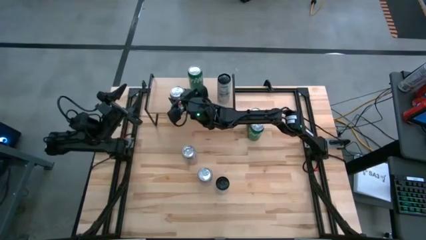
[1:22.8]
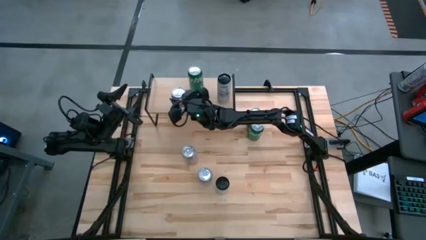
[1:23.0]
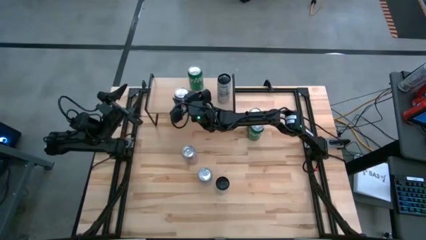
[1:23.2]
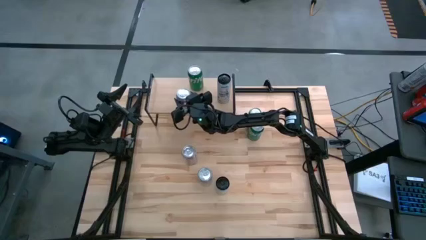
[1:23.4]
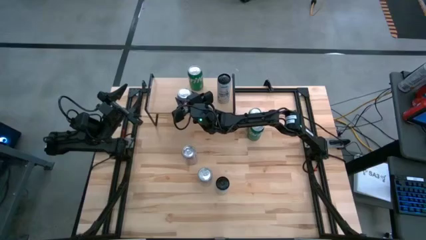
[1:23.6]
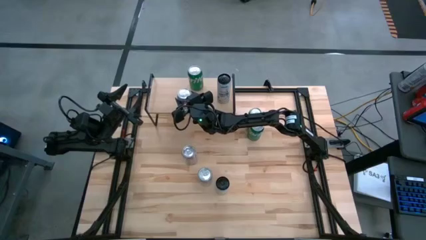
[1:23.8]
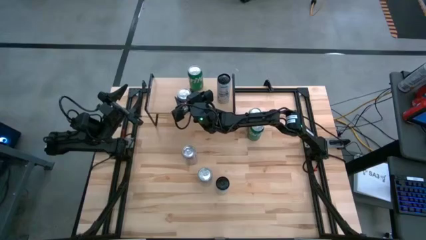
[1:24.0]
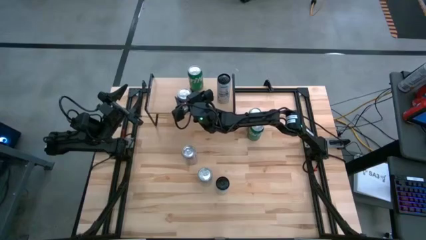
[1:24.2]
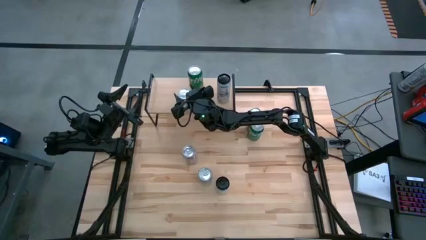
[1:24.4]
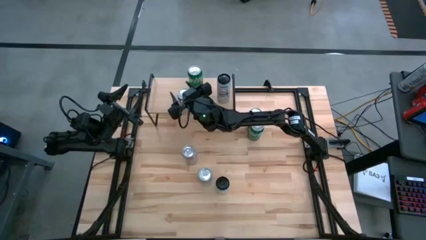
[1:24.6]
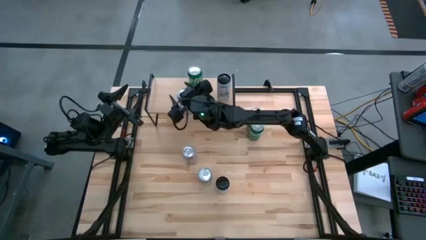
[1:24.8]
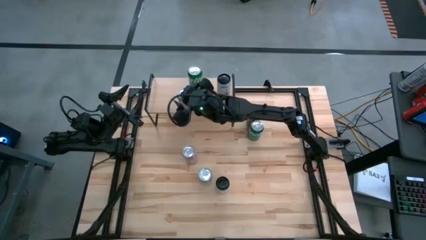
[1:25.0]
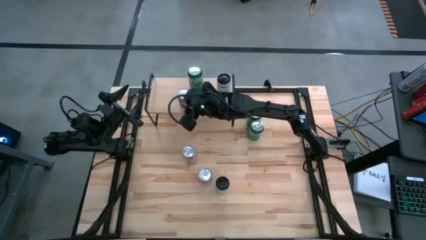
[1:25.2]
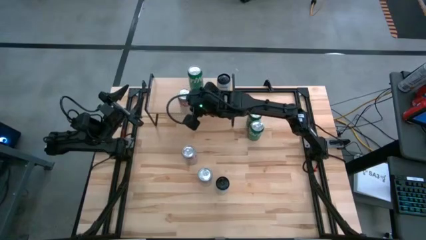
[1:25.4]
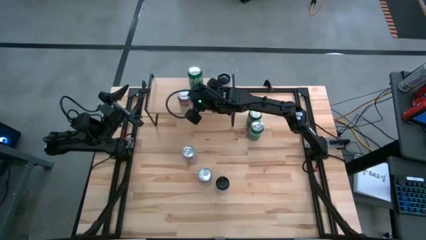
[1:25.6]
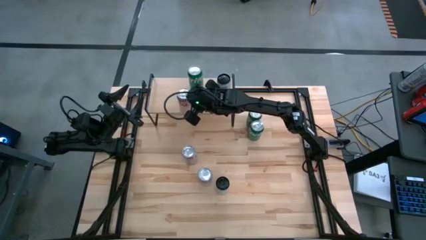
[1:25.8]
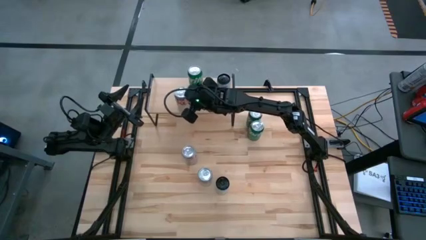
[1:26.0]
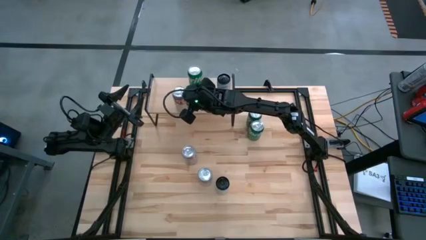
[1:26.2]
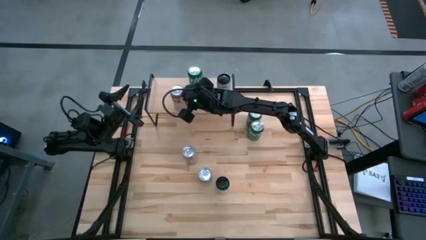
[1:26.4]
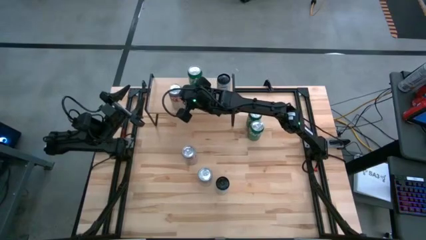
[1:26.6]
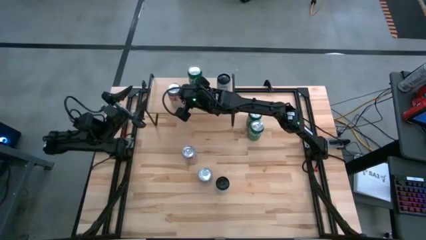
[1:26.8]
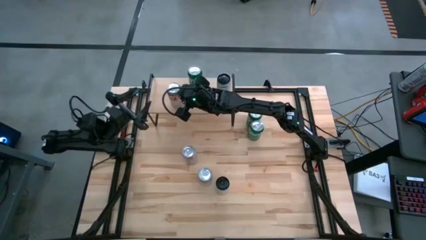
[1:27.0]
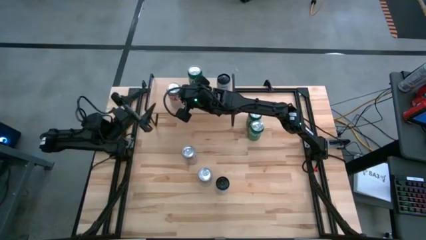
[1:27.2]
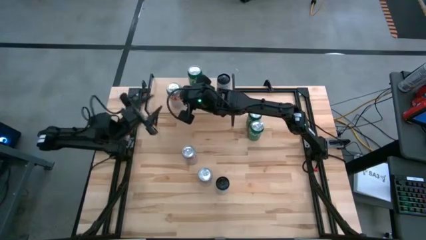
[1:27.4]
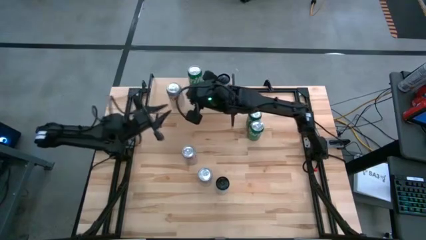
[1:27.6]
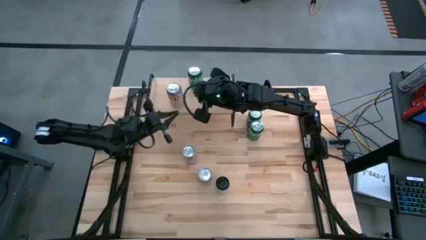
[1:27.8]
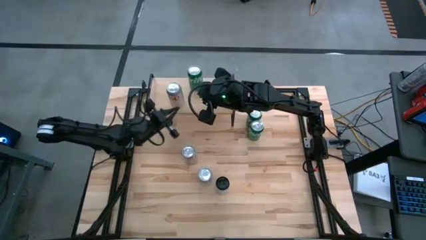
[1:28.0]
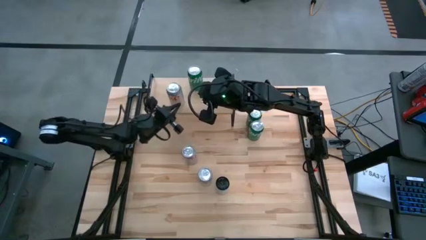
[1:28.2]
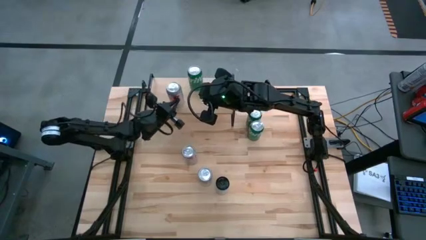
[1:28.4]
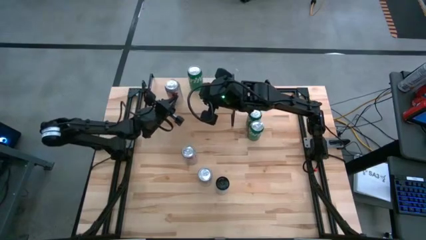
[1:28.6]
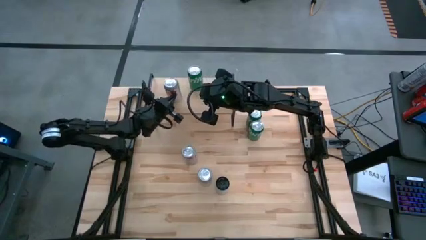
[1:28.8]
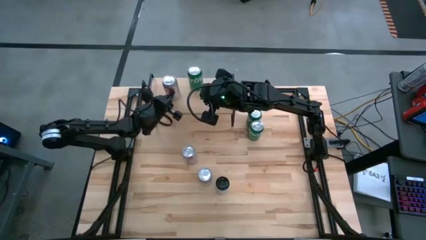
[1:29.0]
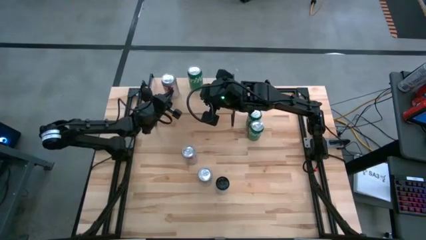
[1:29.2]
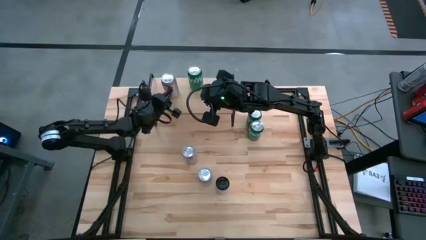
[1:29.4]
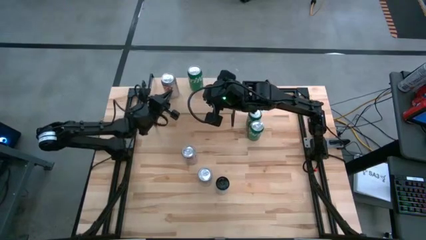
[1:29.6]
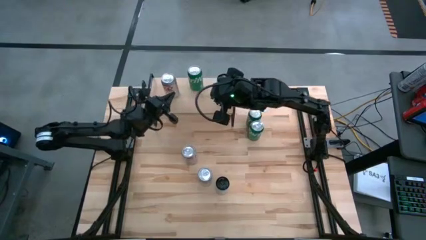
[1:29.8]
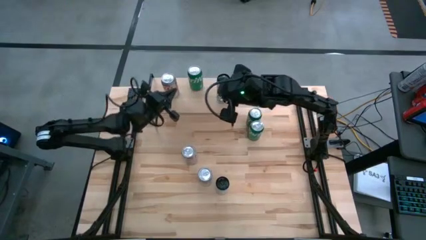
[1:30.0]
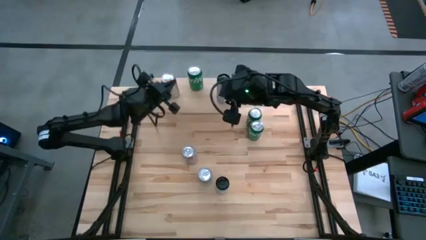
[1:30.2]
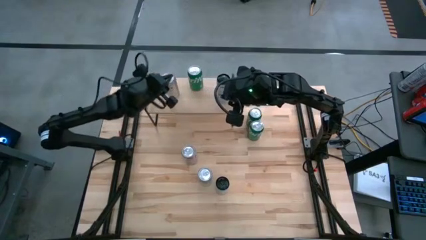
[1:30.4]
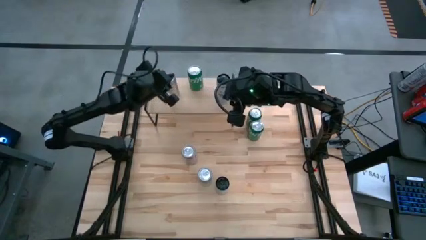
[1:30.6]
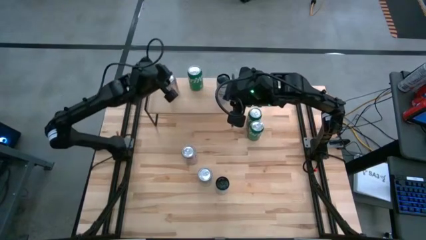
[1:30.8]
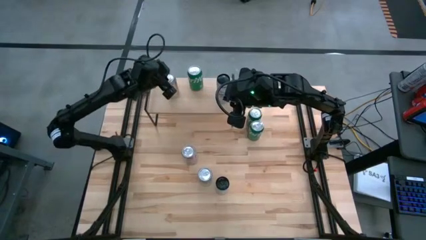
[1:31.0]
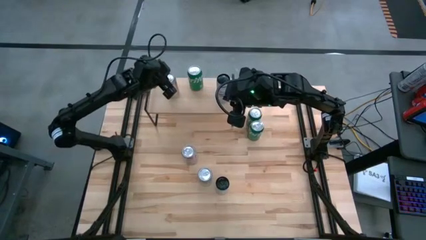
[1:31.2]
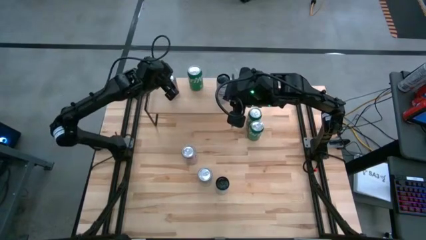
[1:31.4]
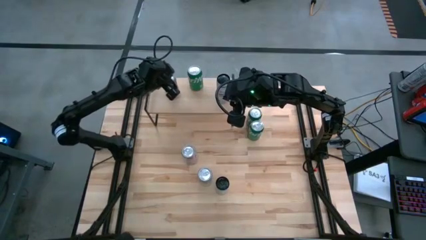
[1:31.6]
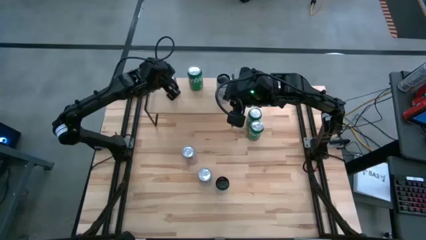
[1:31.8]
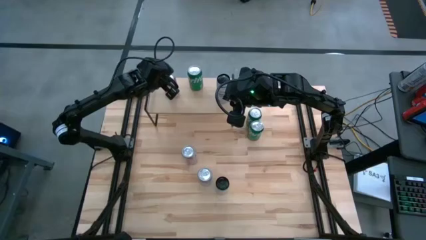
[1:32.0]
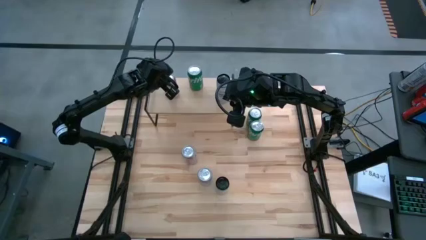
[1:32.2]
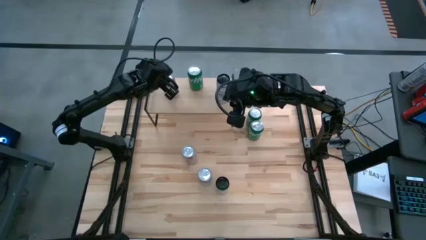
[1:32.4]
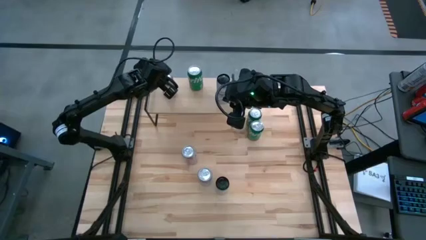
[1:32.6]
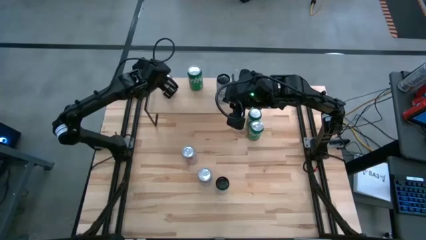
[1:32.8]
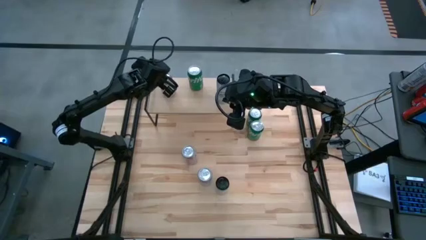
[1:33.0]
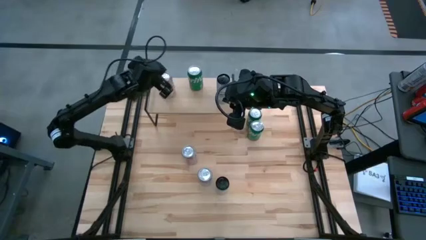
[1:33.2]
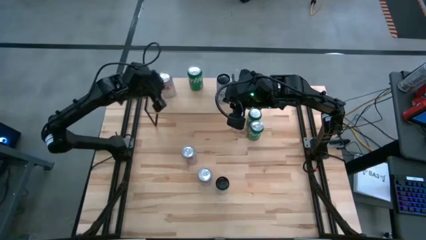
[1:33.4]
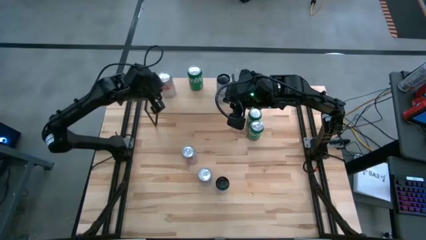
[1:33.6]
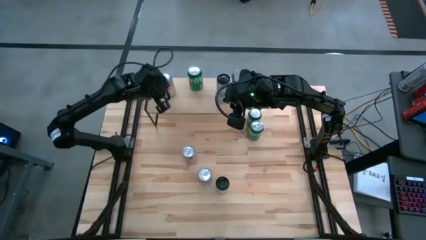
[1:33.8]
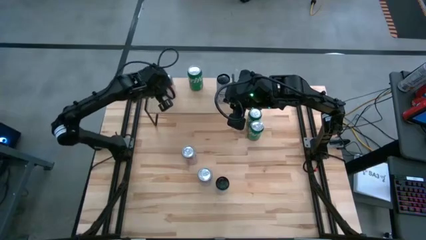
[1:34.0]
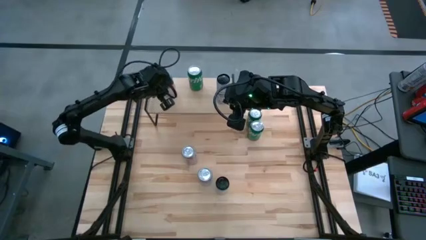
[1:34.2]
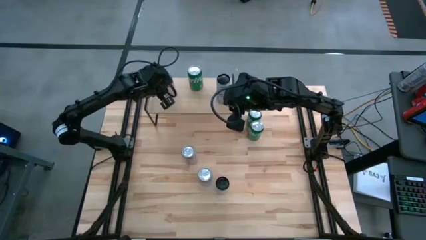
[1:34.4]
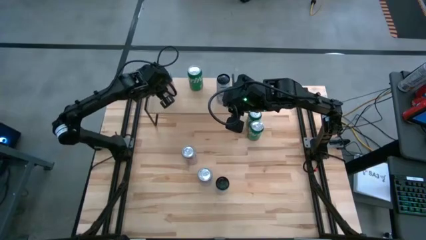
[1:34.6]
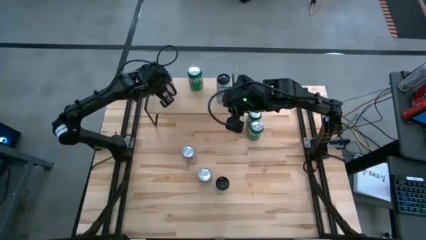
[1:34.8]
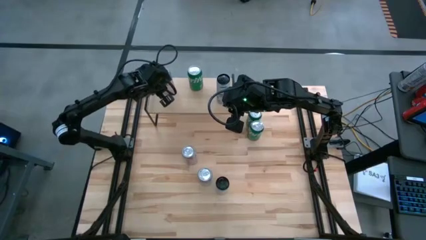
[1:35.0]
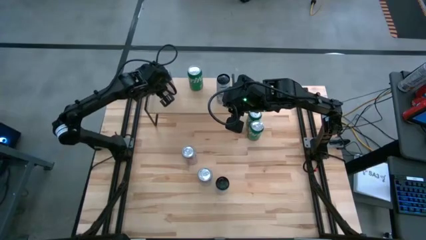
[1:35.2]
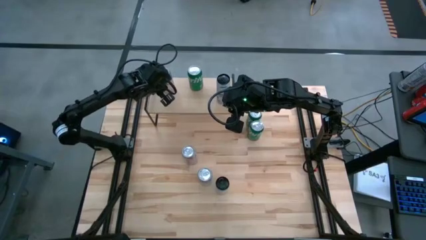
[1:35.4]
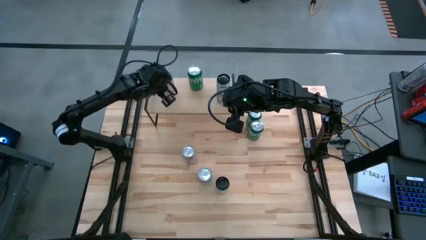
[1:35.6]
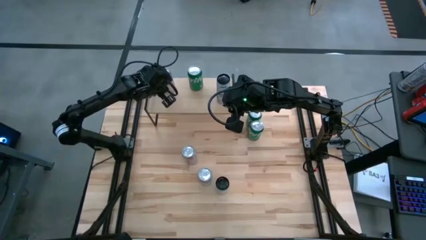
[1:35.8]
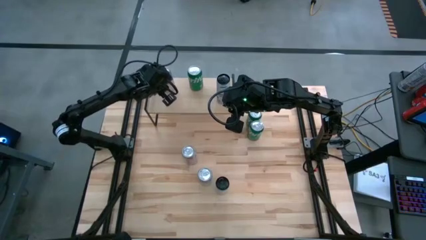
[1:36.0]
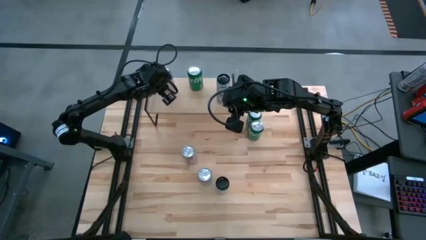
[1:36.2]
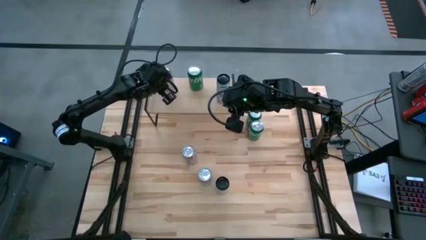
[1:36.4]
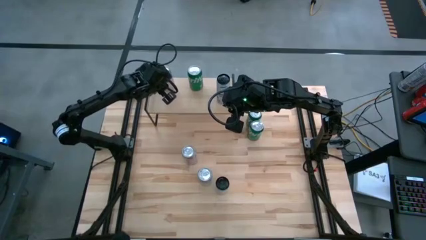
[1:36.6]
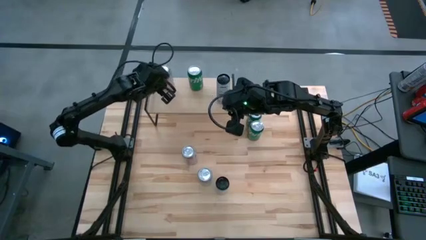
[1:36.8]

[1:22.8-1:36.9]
Task: Place canned beverage on shelf
Put the bottom right red-silver soda can on the shelf

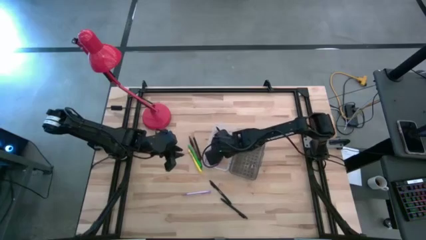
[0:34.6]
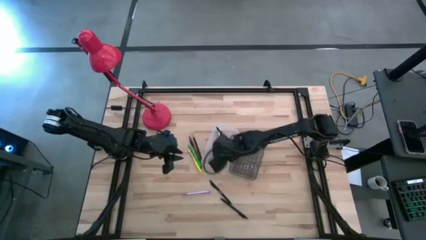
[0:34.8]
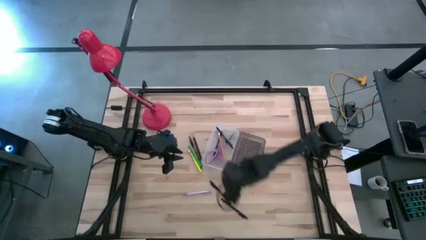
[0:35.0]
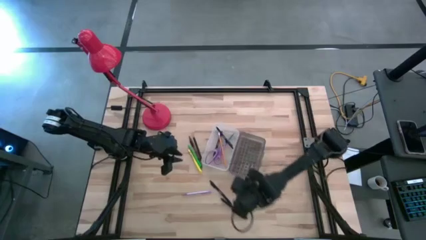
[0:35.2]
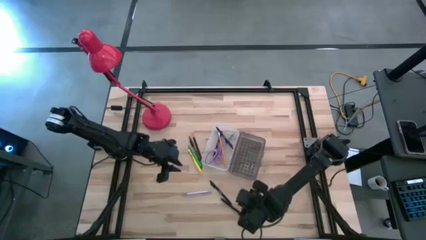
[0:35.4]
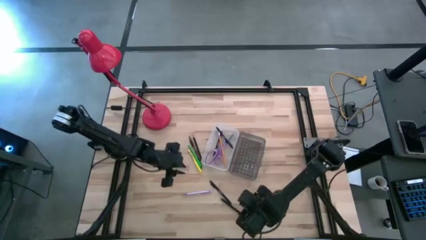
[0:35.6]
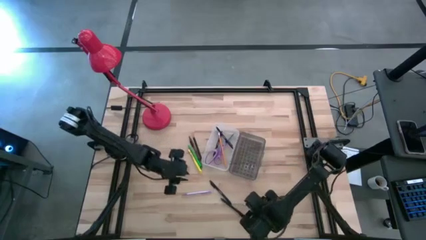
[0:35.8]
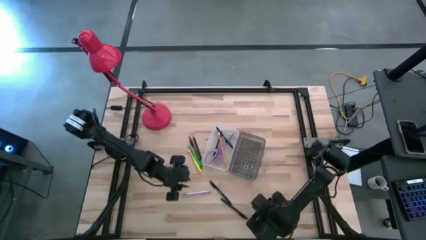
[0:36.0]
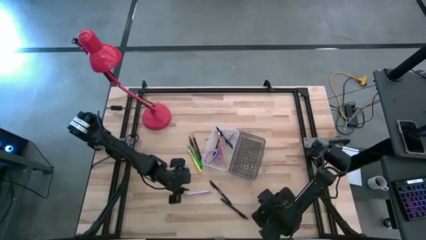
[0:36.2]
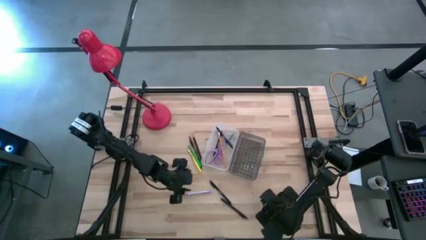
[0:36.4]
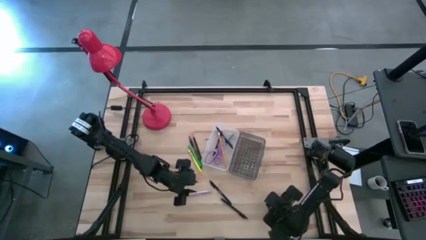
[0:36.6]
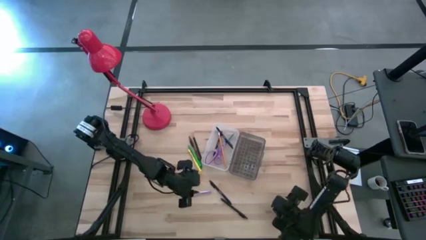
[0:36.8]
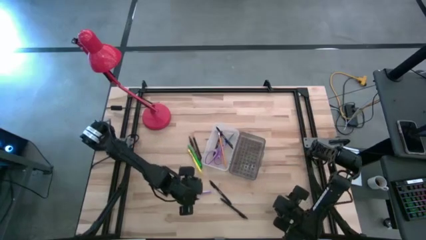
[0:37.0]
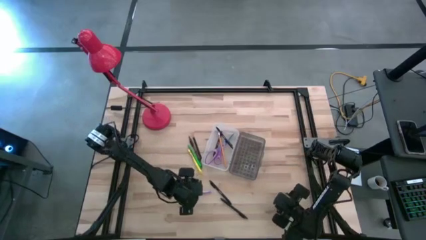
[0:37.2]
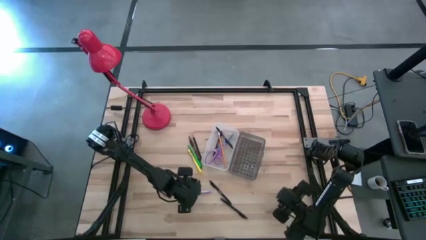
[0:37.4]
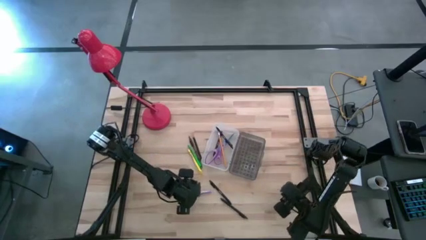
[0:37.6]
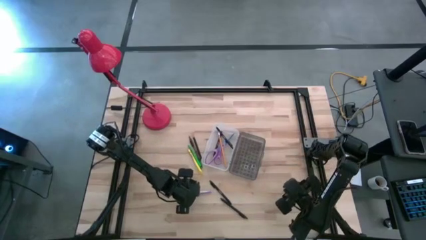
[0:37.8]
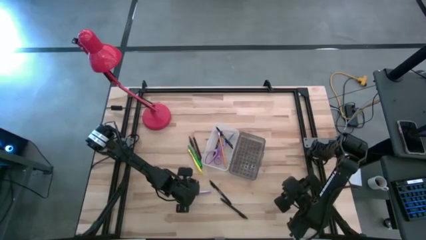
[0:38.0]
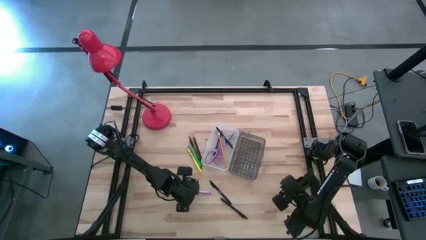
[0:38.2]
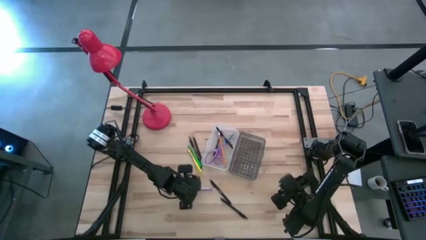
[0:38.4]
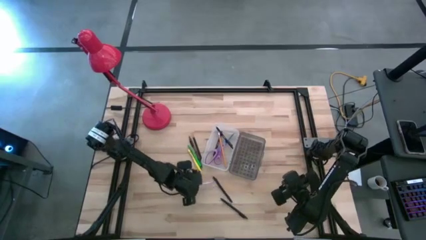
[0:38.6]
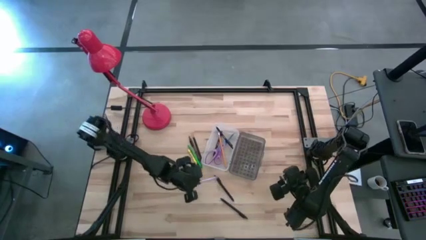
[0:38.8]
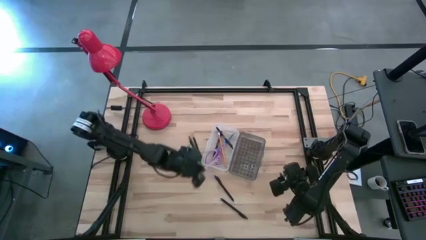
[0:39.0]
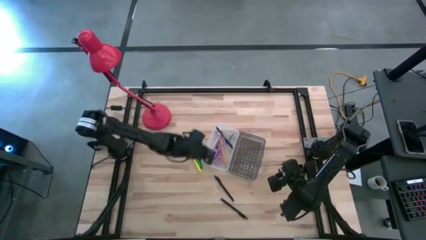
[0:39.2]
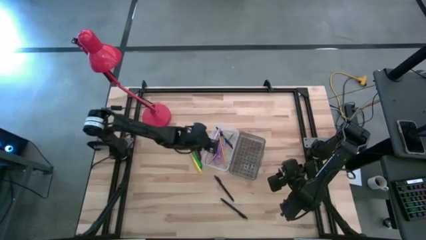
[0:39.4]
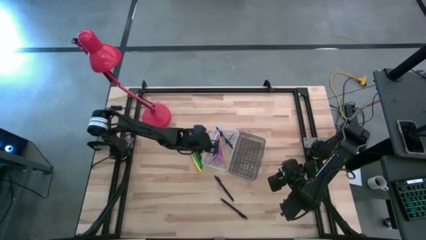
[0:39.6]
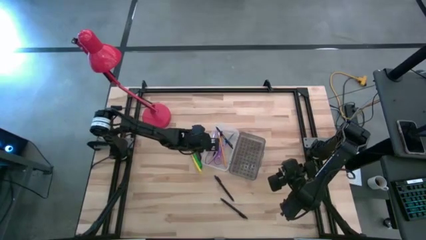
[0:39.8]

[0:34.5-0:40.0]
Task: Pick & place school supplies into a supply box
Put the purple pen into the supply box
